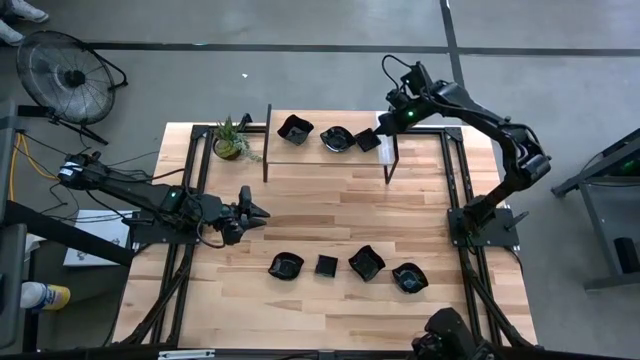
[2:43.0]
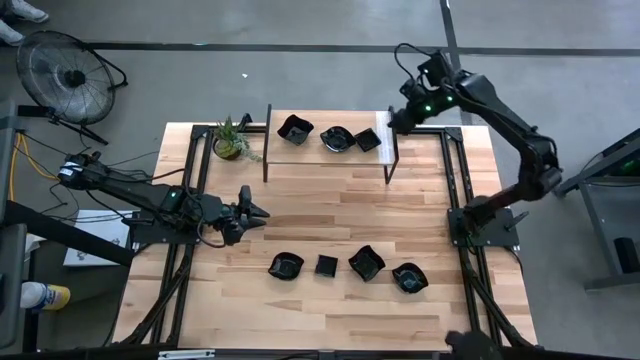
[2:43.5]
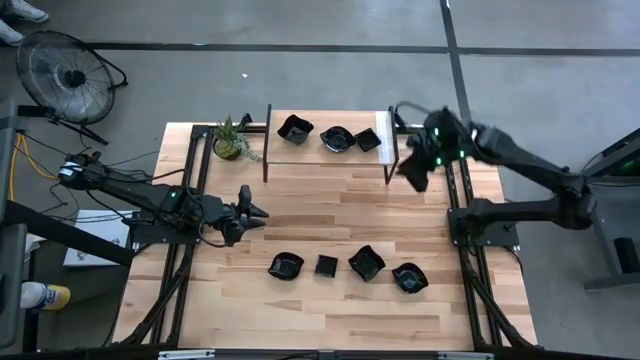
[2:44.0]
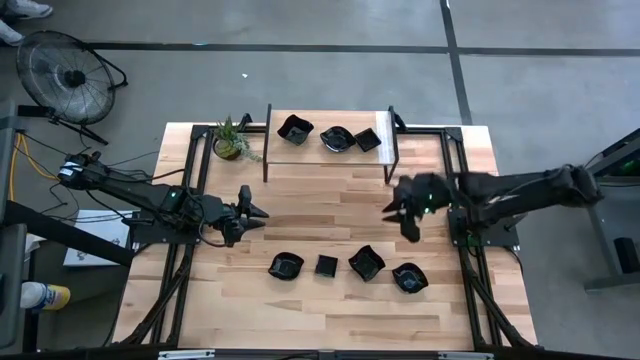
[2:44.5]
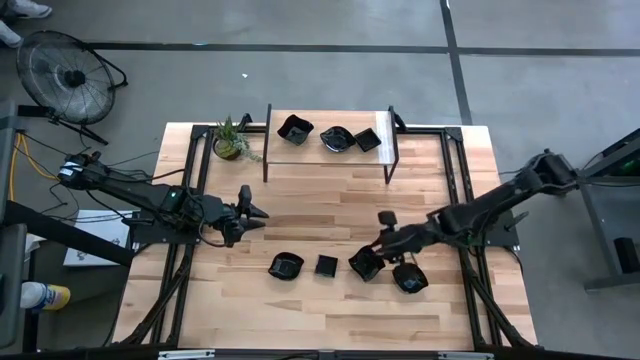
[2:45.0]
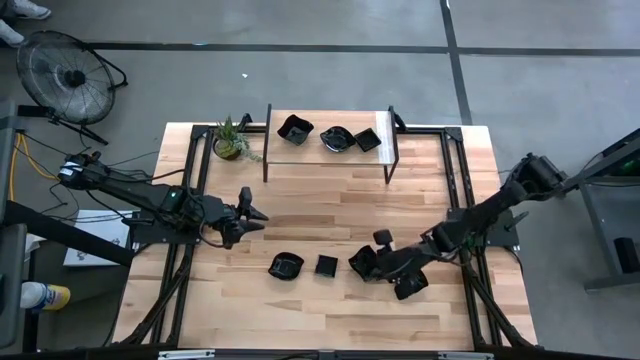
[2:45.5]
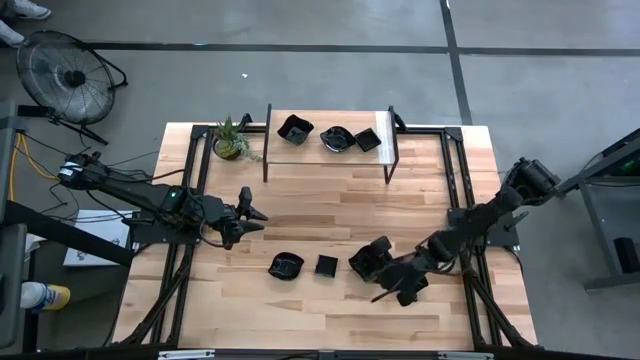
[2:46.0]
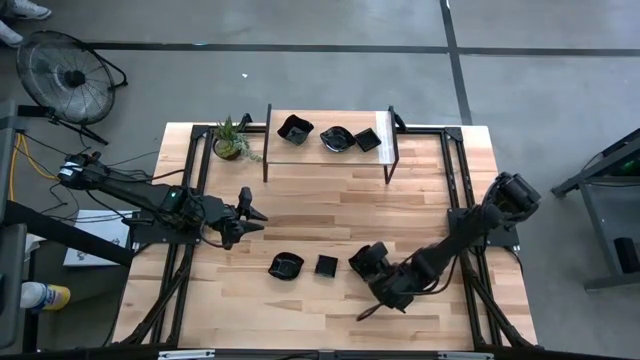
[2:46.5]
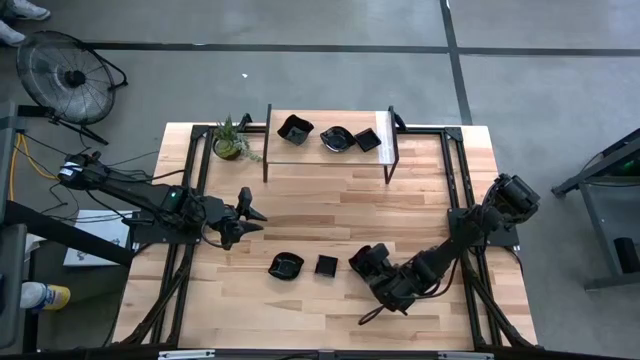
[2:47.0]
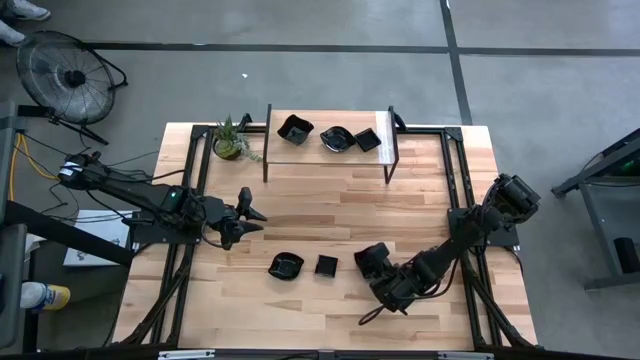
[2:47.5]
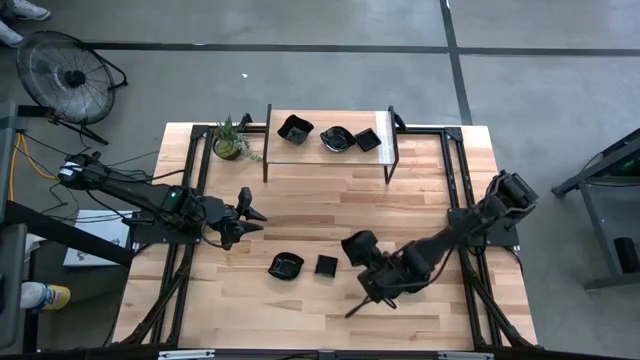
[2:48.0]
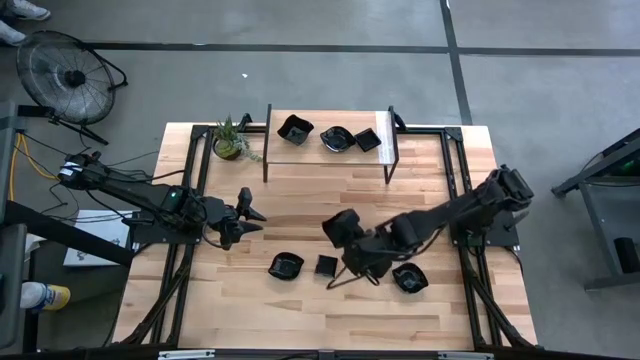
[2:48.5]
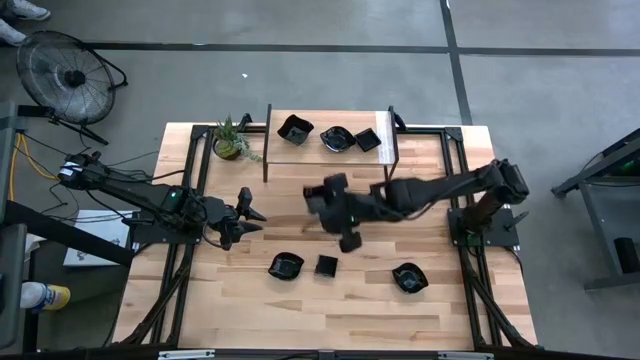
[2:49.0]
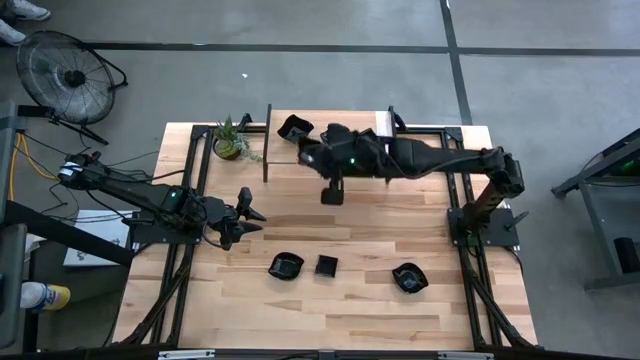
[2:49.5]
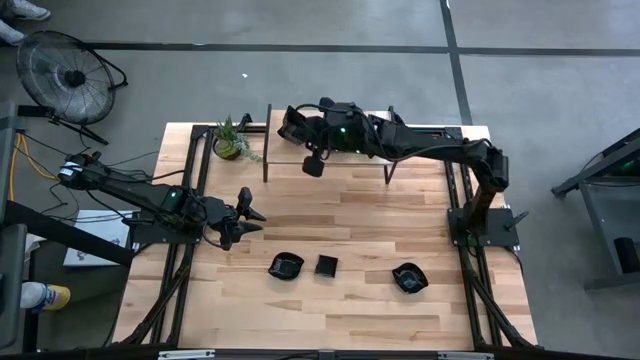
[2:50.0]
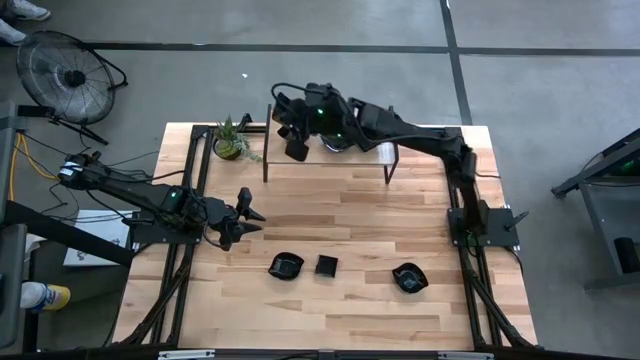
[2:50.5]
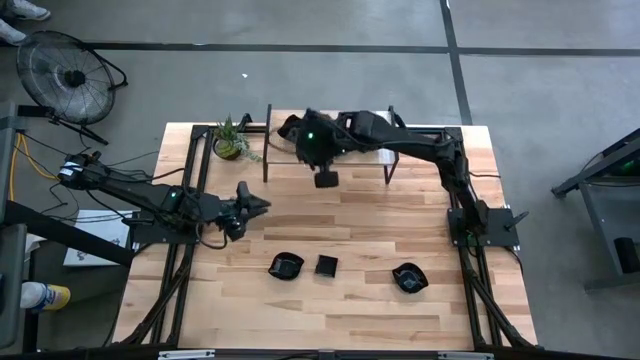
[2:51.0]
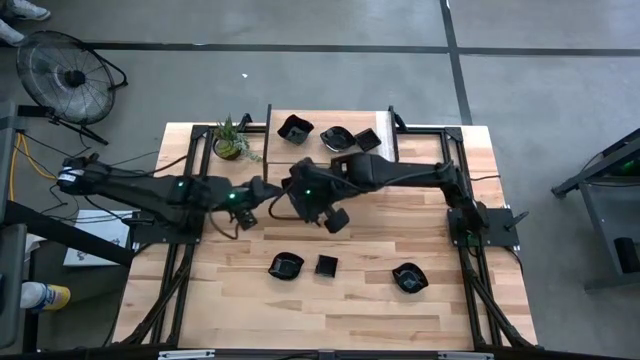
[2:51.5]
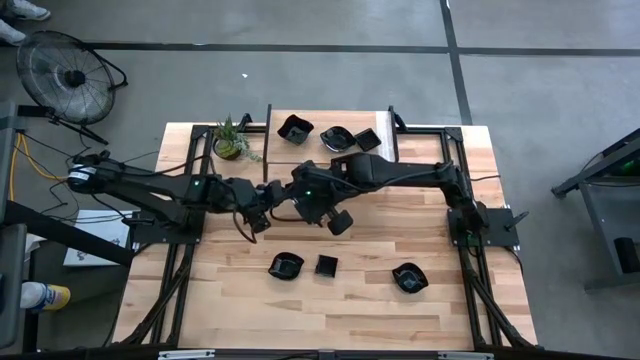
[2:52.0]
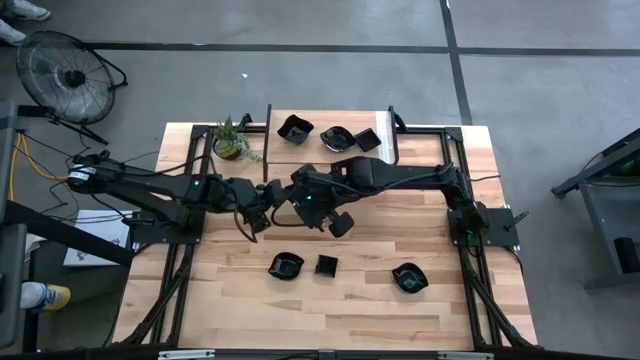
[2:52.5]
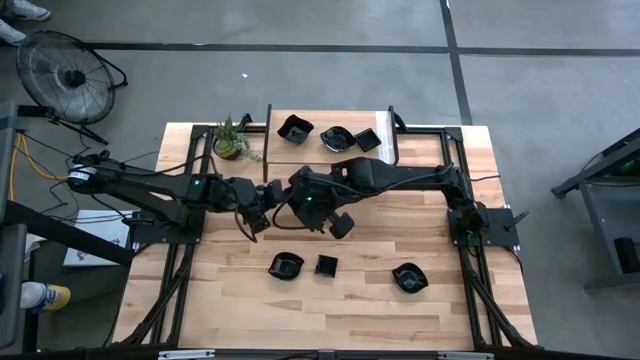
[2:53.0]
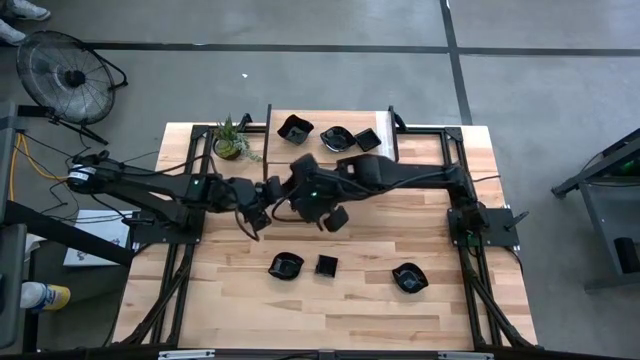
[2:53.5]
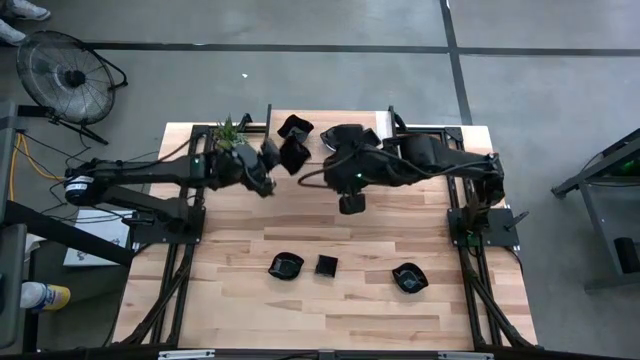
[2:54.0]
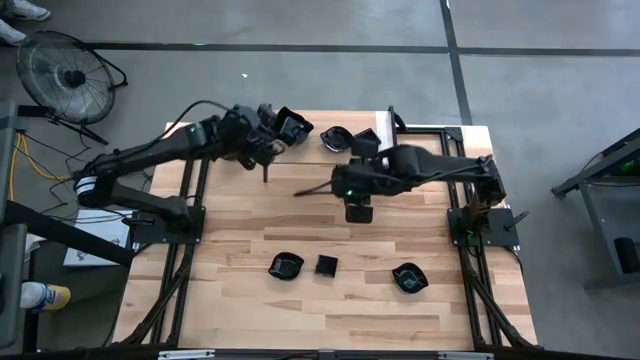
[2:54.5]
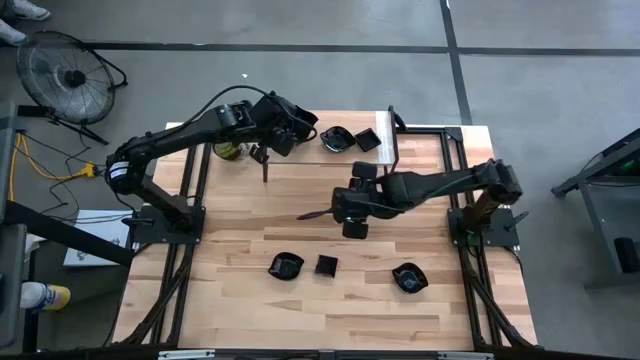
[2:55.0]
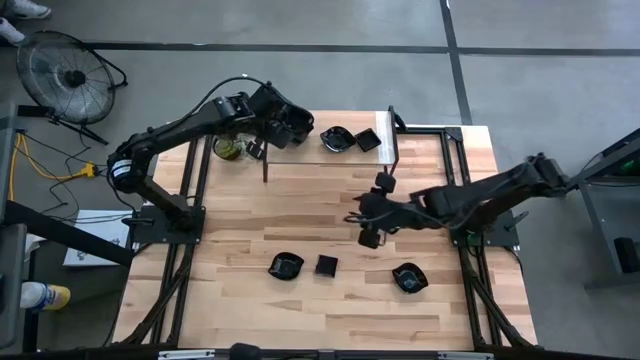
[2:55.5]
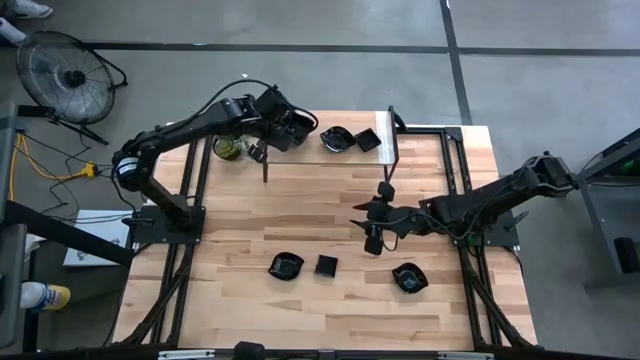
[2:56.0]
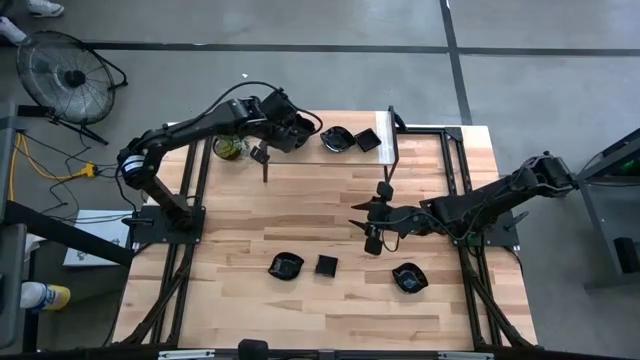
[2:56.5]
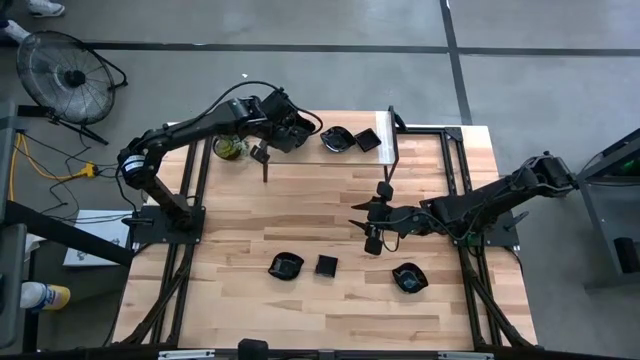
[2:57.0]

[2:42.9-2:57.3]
Task: Pick & Place Mini shaped plates
Stack the black distorted square plate on top of the black distorted square plate on the shelf

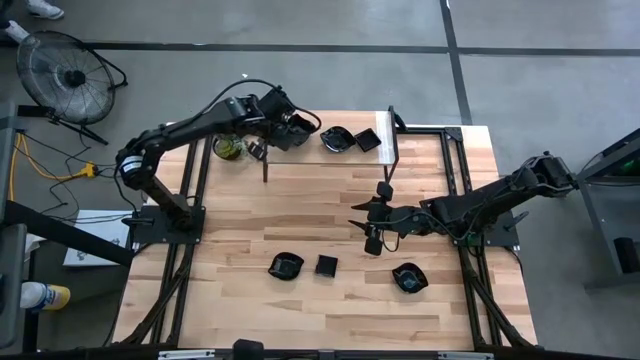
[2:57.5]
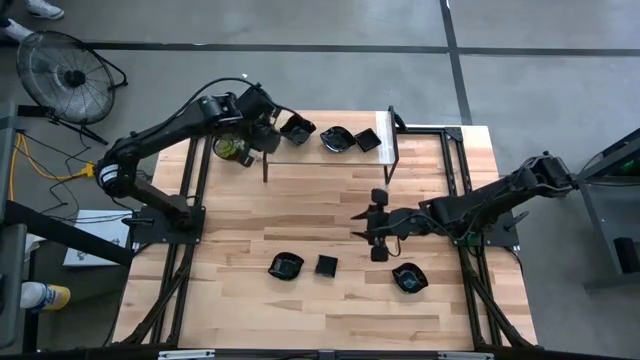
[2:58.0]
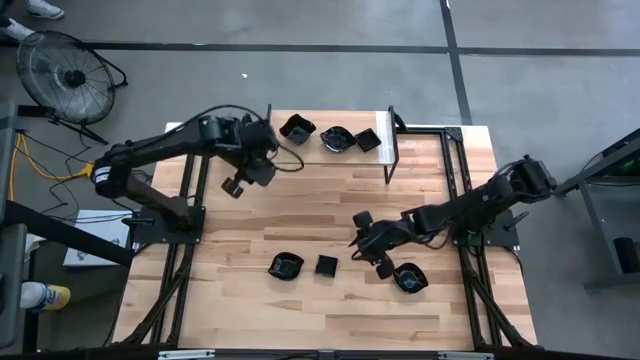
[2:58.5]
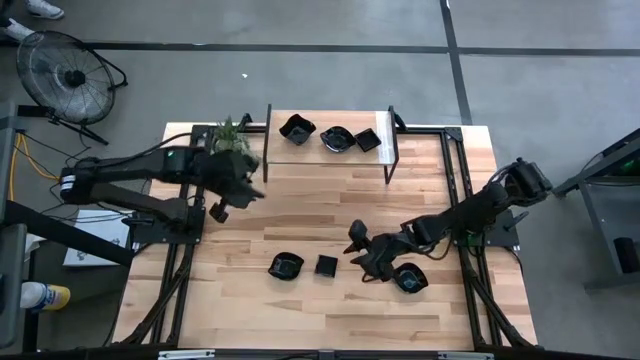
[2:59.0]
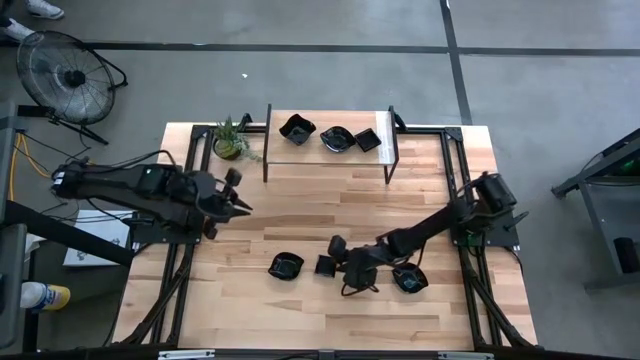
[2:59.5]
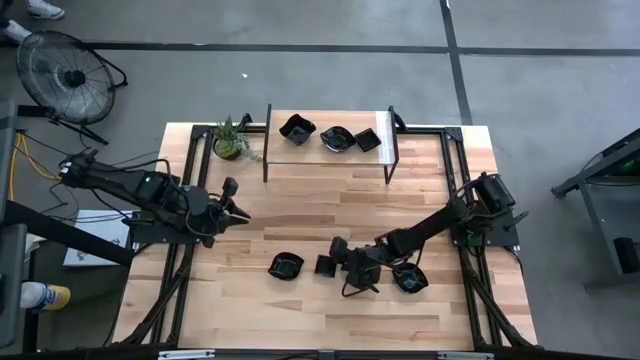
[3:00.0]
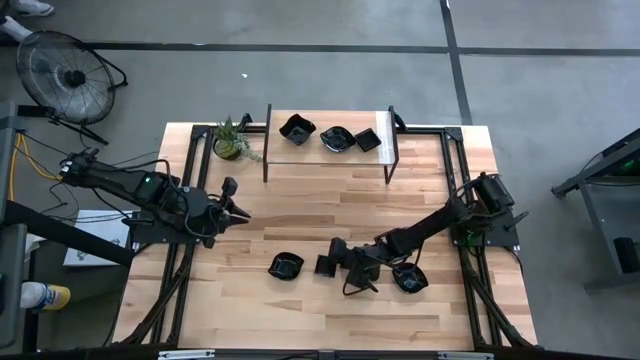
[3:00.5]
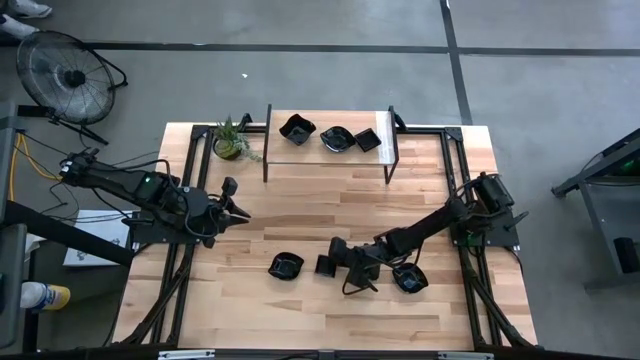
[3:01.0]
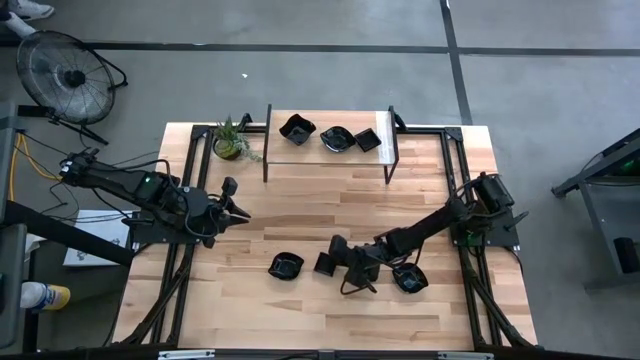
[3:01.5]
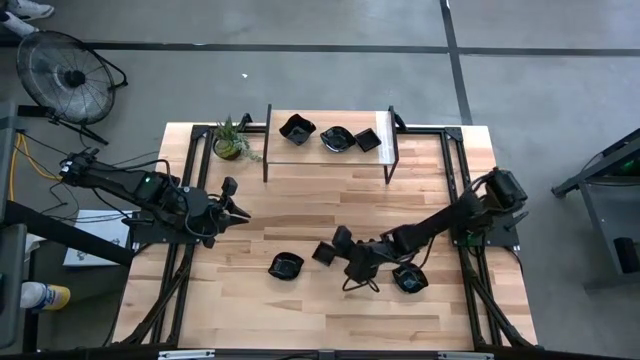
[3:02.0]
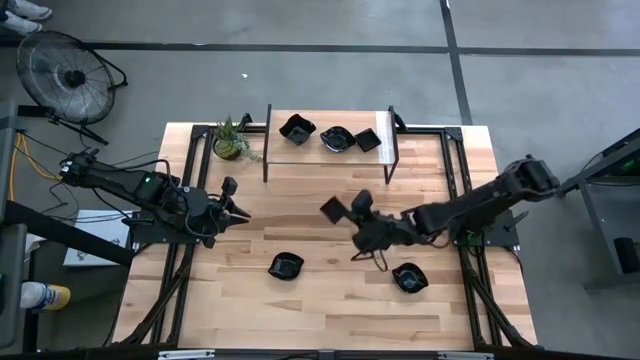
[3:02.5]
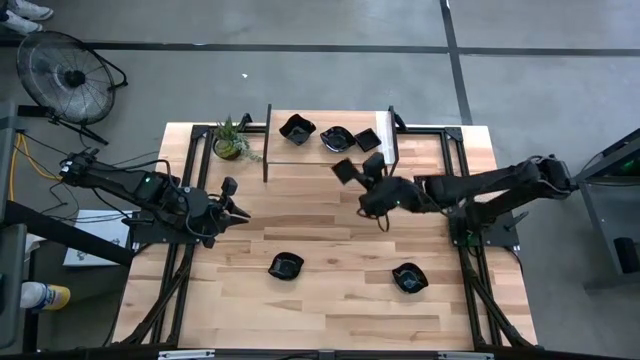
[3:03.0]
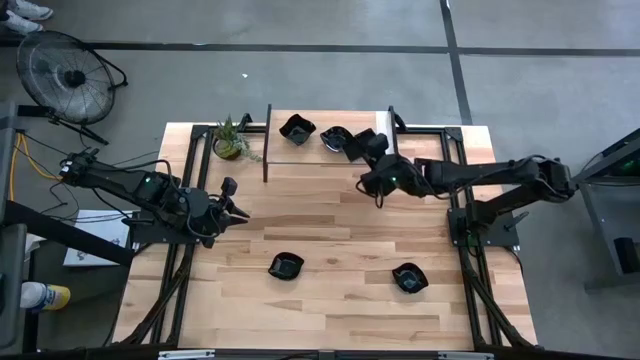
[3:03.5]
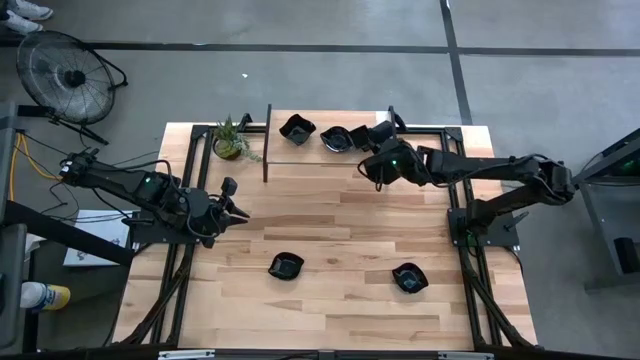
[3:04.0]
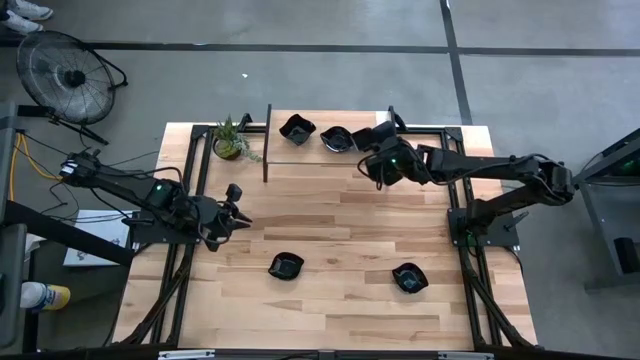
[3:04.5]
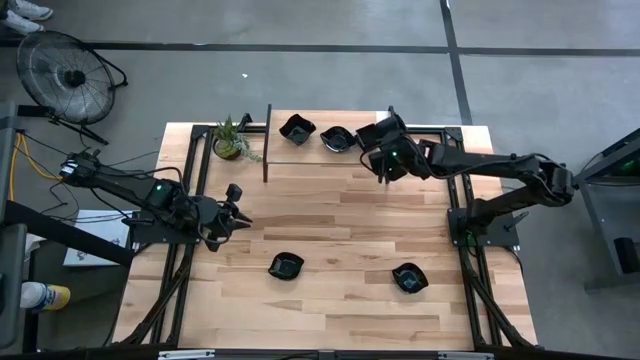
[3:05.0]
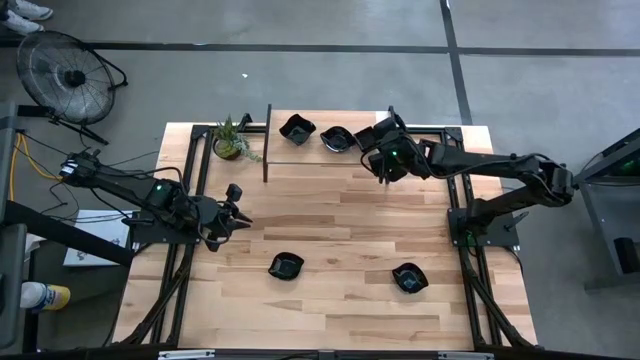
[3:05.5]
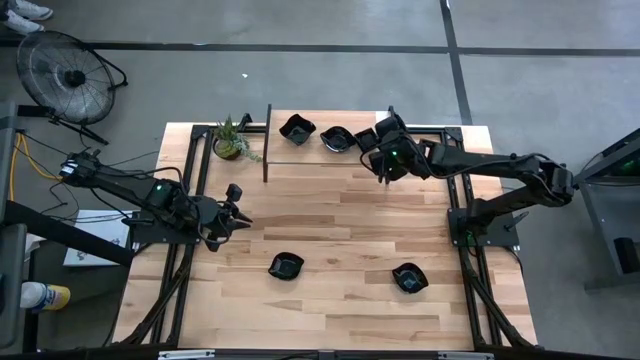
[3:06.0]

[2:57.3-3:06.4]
Stack the black square plate on top of the black square plate on the shelf
